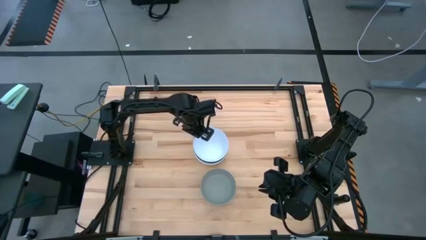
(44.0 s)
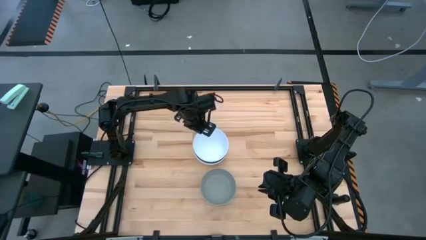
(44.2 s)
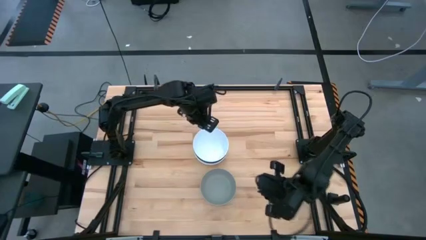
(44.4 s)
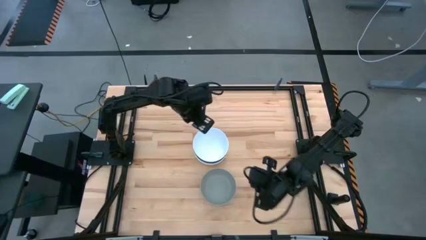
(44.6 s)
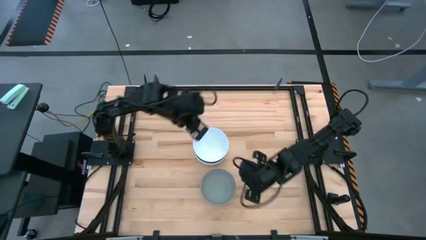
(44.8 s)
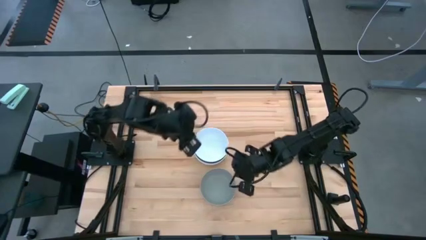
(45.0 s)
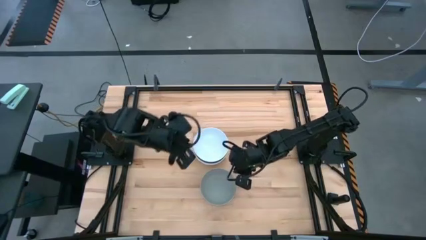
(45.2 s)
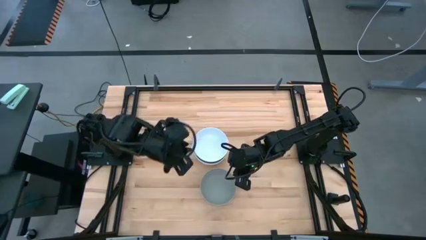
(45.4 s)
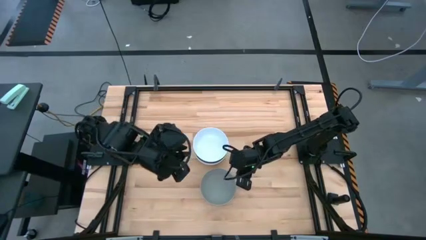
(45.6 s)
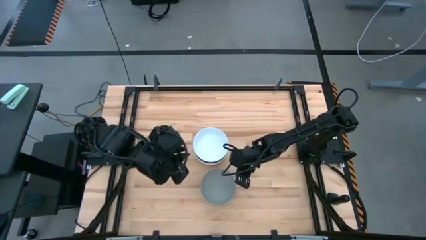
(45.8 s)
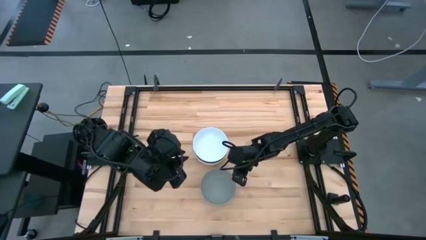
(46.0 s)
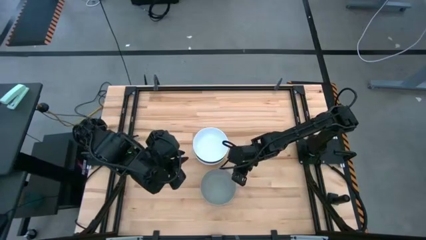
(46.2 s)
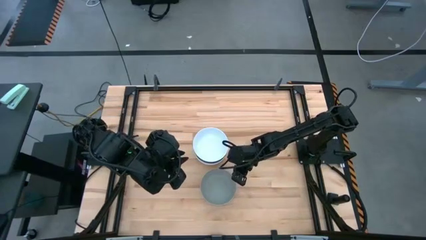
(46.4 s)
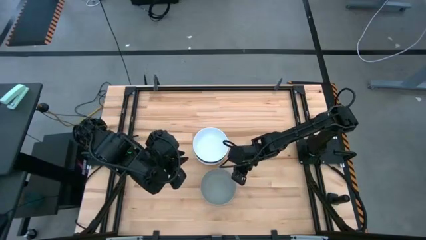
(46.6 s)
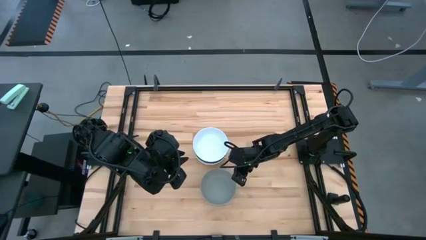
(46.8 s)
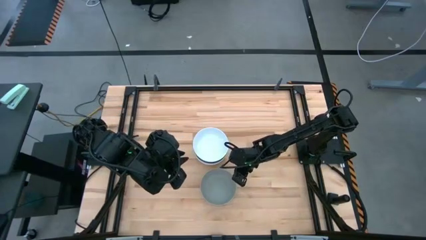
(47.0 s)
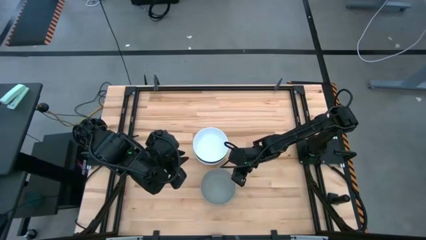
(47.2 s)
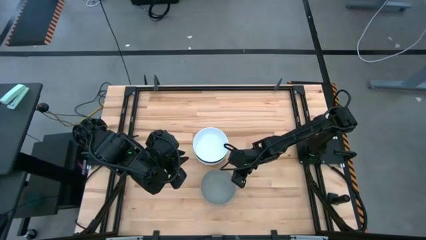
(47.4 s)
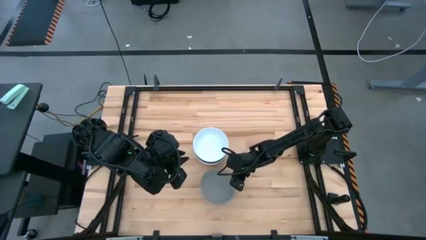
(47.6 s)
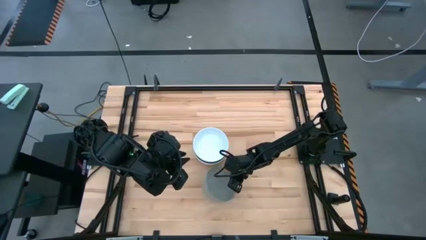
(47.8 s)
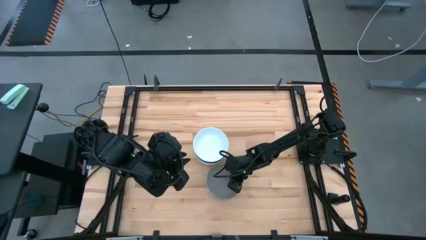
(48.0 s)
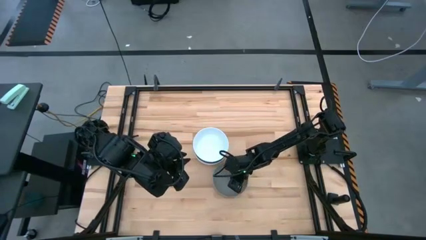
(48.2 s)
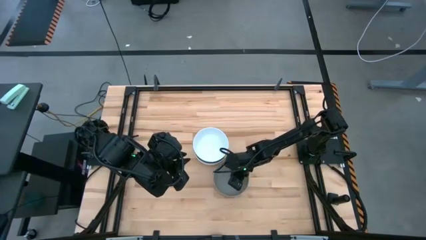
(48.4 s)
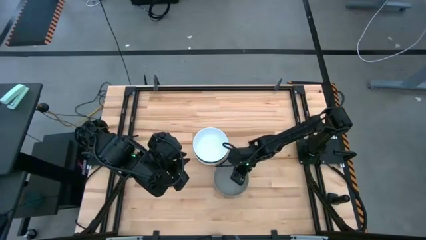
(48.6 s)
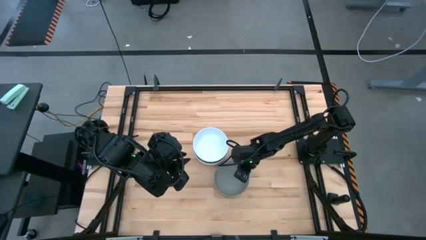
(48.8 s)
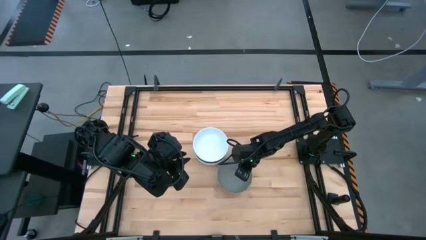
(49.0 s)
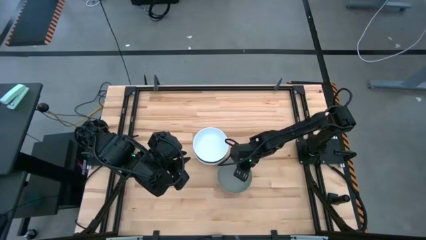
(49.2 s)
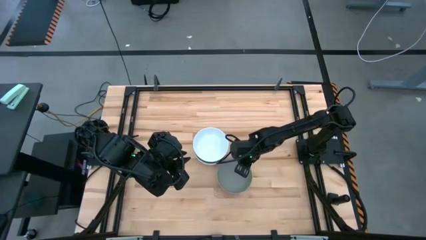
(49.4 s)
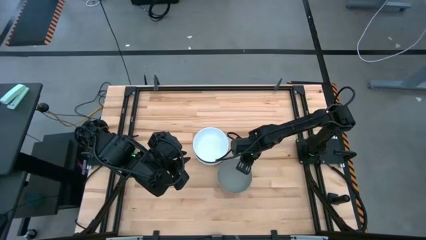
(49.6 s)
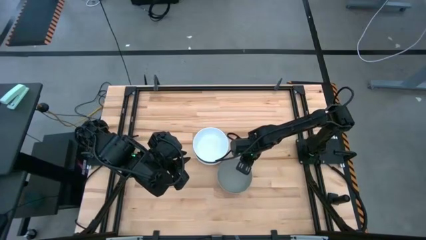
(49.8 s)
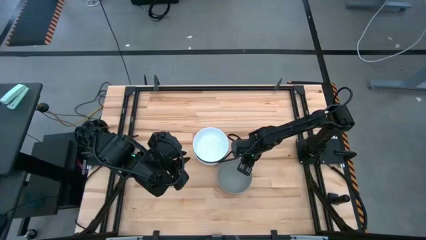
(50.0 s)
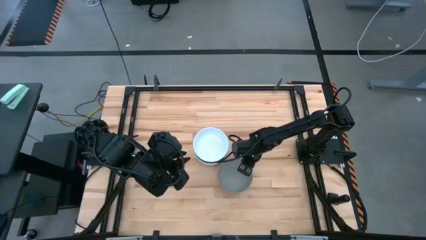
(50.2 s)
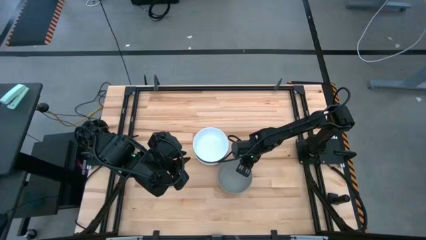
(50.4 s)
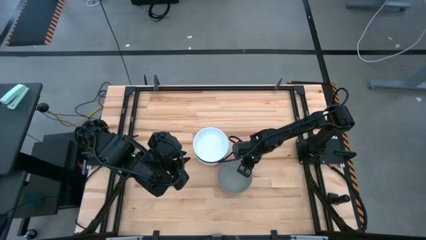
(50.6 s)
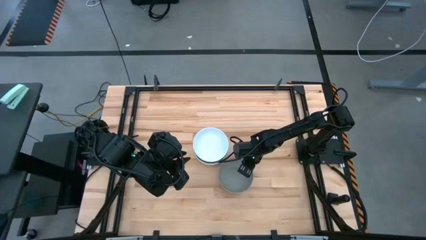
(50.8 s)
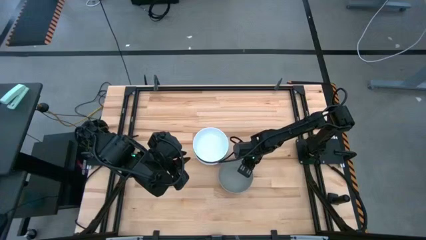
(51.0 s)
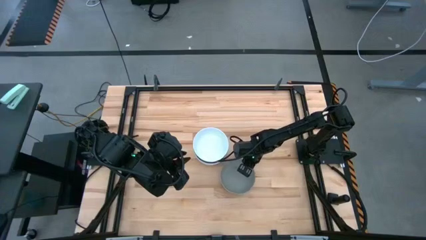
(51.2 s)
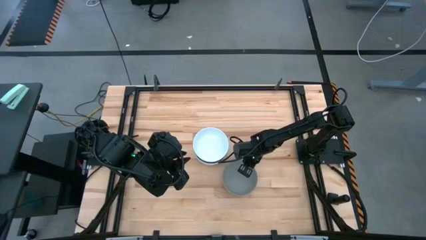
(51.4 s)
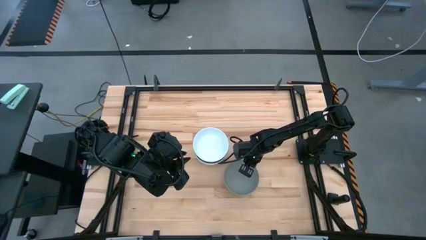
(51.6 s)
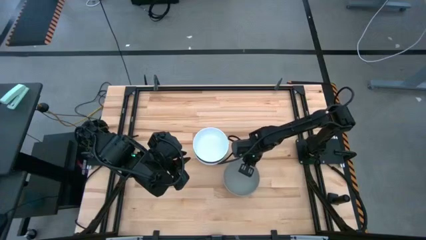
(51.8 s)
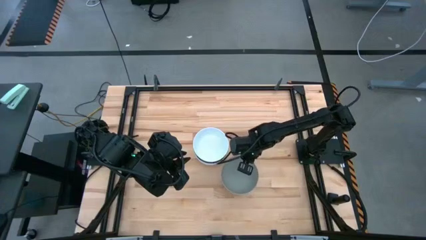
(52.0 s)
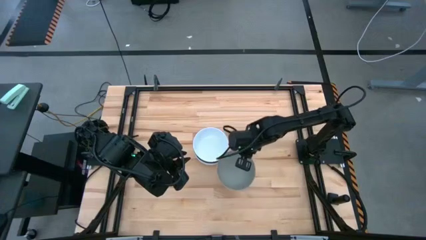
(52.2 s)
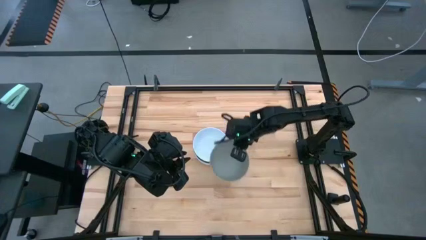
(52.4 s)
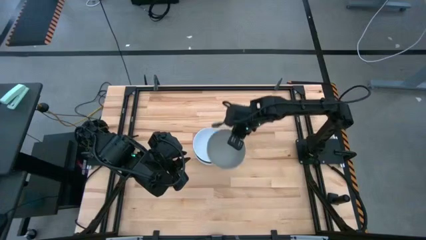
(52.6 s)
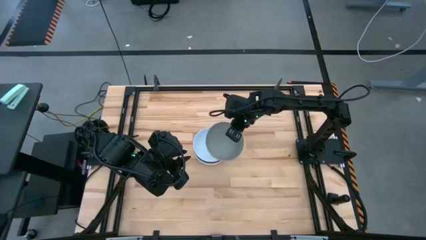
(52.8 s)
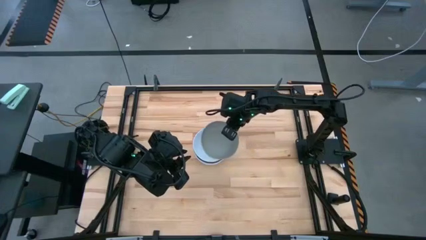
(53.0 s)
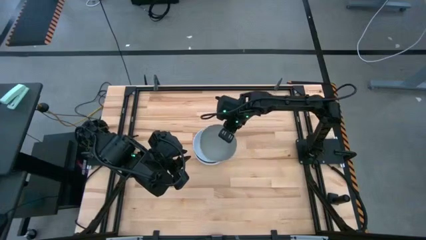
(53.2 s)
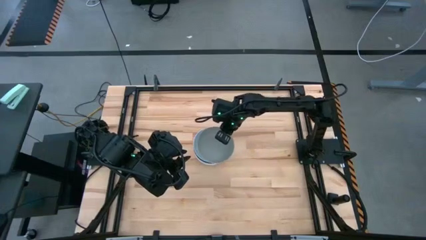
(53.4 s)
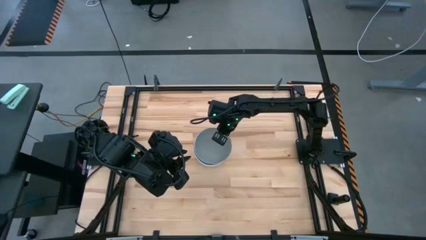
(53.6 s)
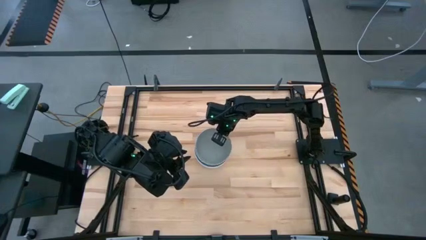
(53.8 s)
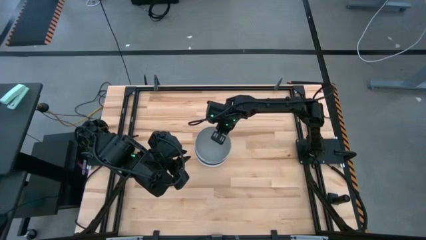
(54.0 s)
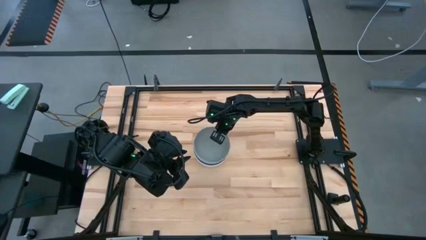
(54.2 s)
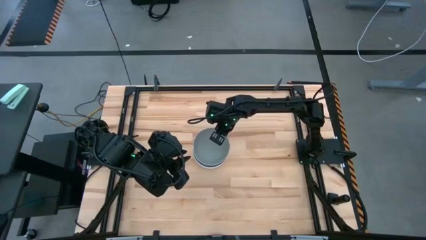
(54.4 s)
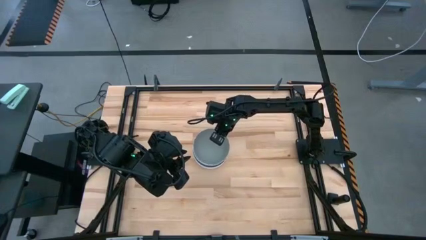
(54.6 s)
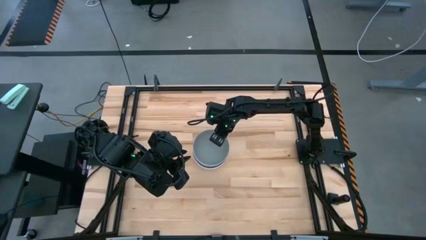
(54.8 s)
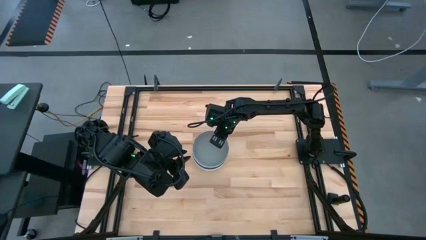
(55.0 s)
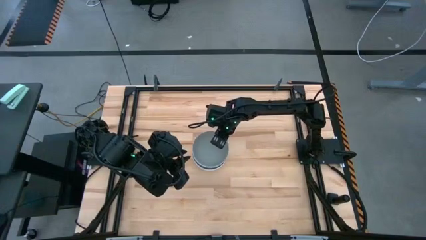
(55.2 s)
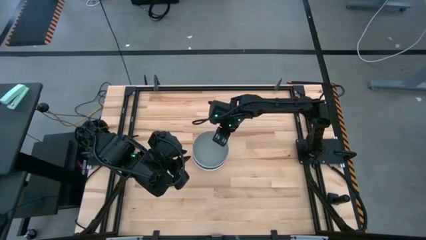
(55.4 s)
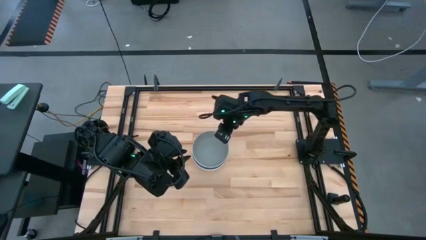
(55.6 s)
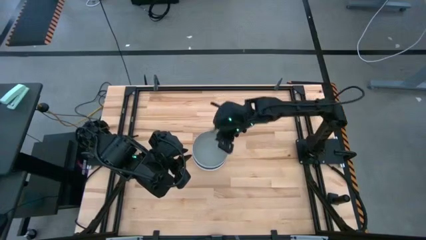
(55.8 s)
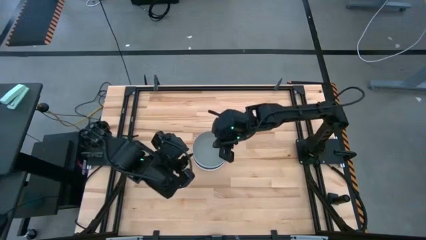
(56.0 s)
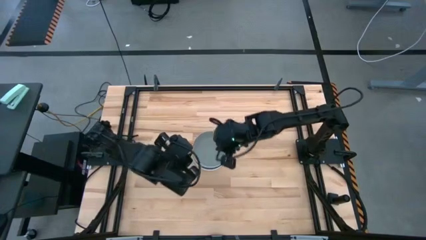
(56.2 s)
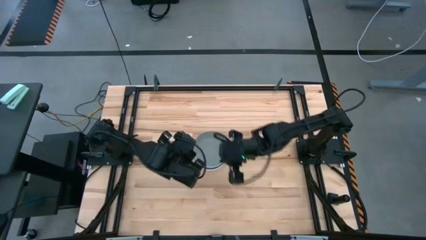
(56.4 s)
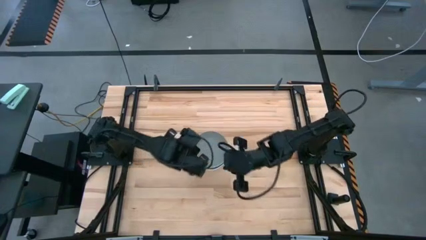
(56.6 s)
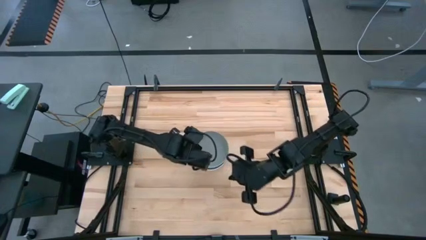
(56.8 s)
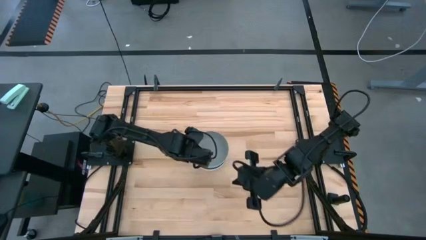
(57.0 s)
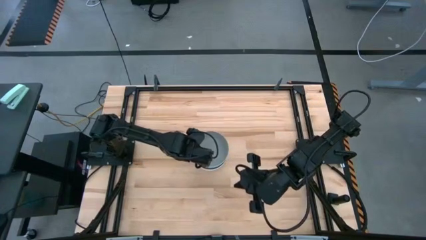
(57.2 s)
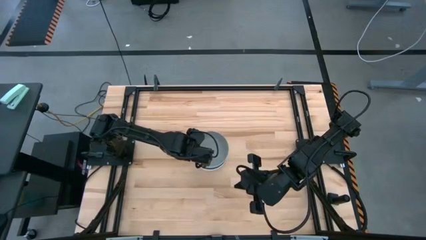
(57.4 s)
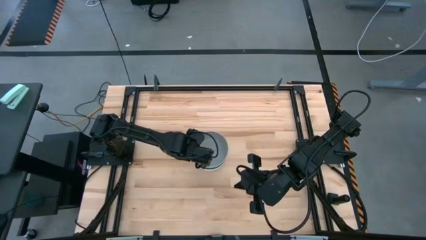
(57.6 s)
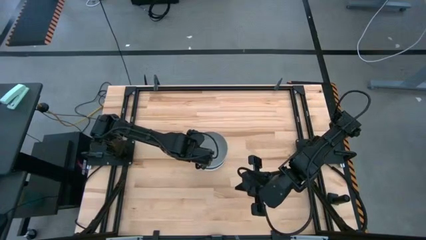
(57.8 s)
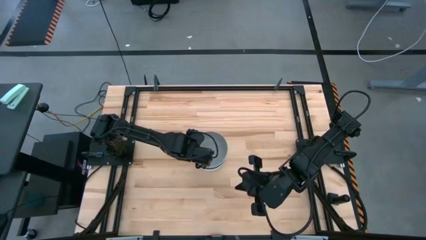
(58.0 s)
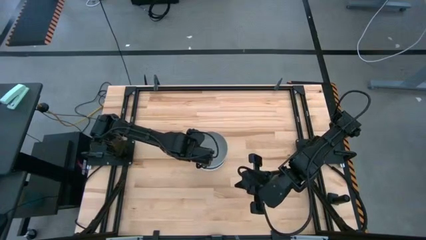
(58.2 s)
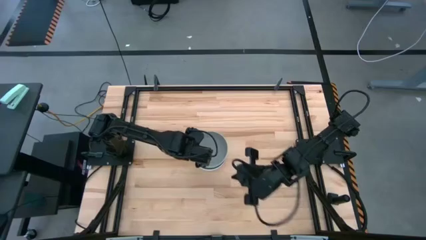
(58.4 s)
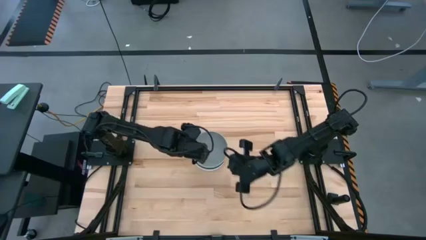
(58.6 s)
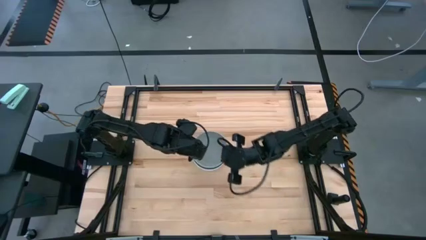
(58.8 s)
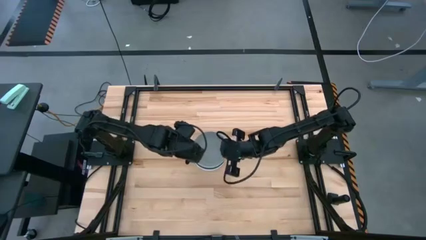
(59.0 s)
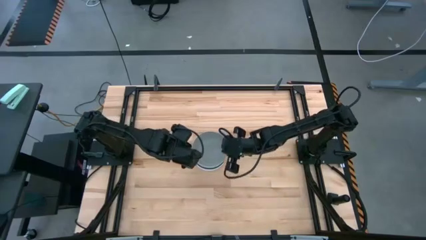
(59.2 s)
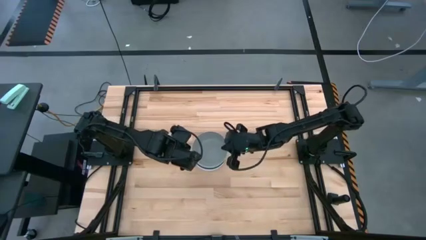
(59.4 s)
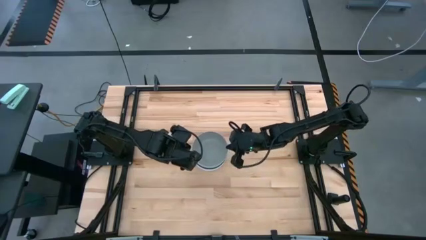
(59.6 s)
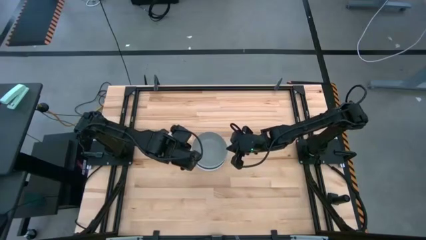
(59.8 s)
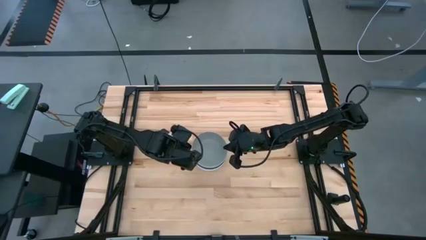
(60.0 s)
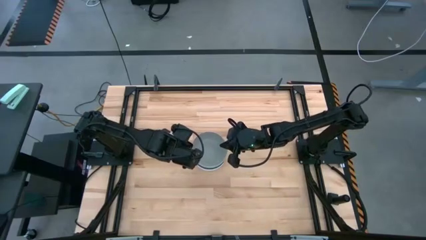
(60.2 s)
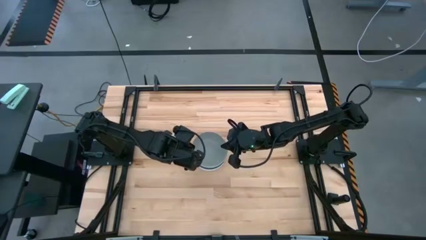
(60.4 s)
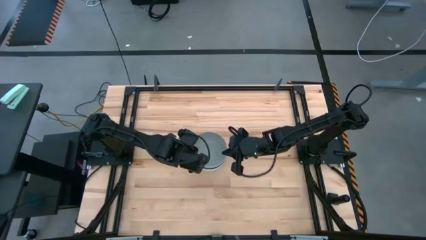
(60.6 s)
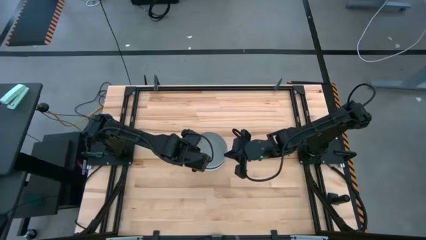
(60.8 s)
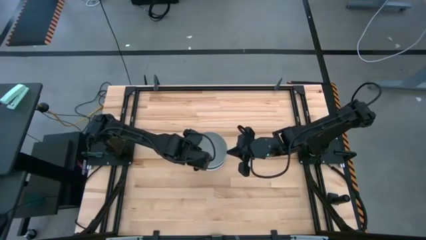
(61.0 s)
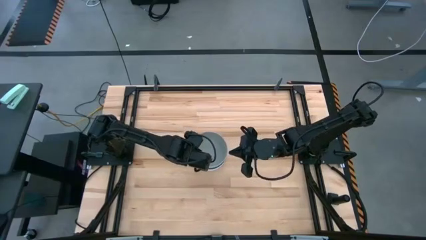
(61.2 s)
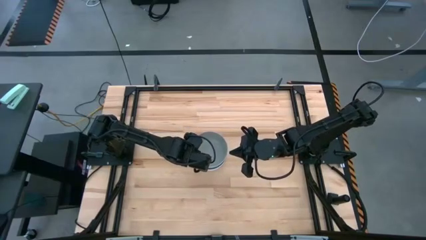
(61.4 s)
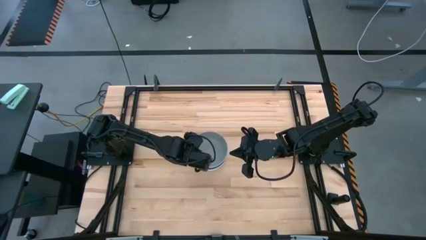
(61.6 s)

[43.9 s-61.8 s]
Task: Nest bowls inside each other
Stack the light gray bowl on top of the white bowl
